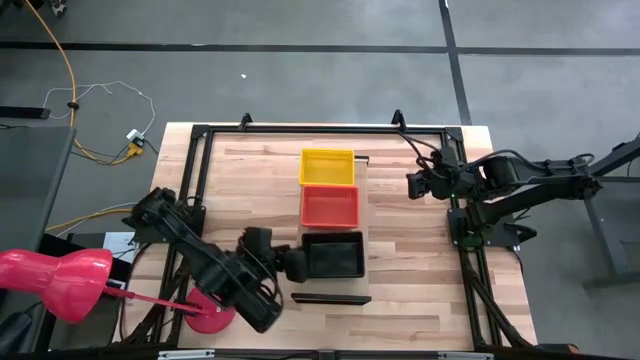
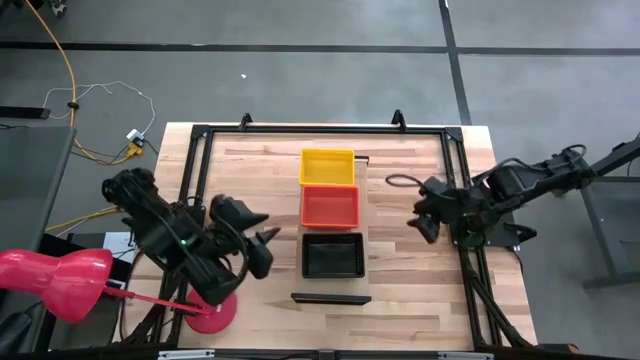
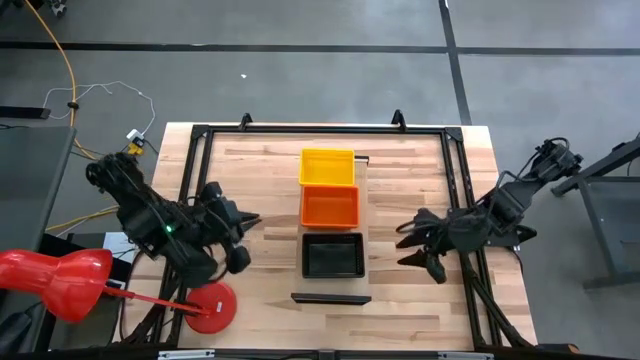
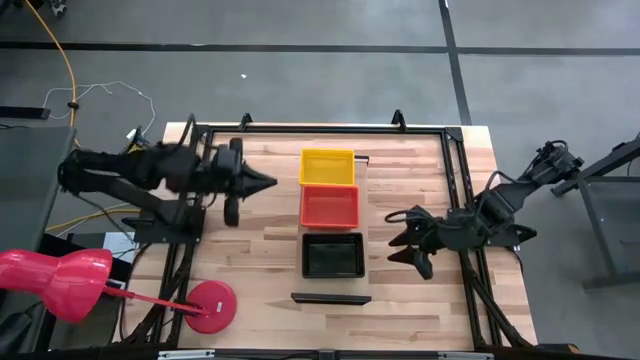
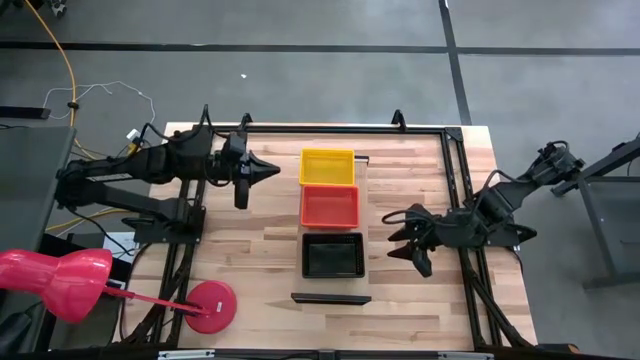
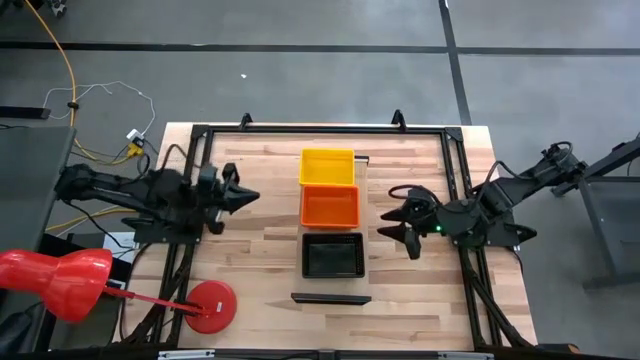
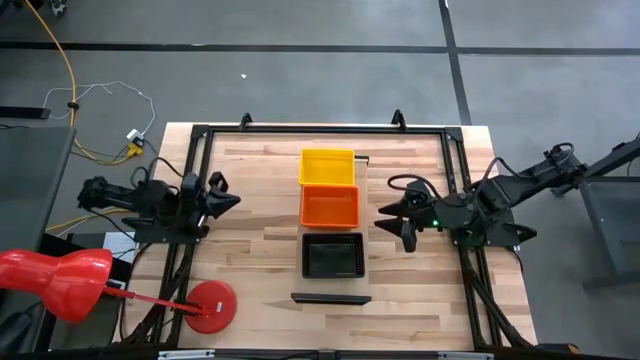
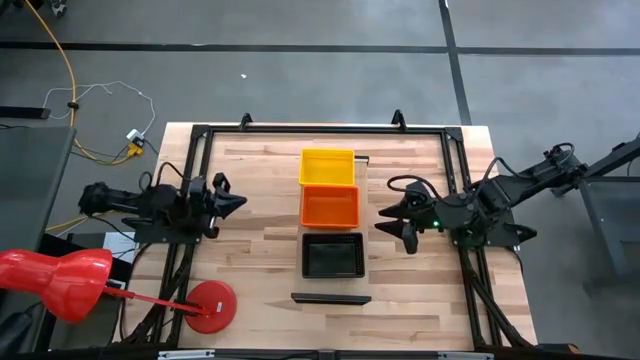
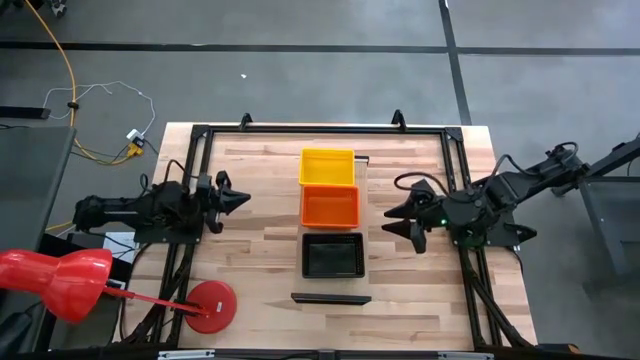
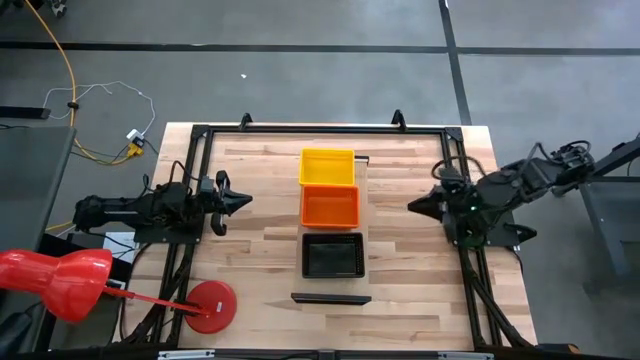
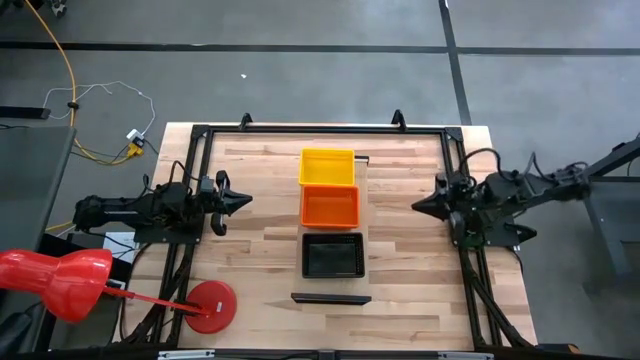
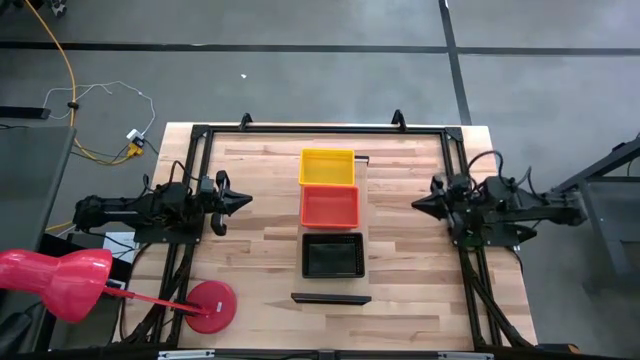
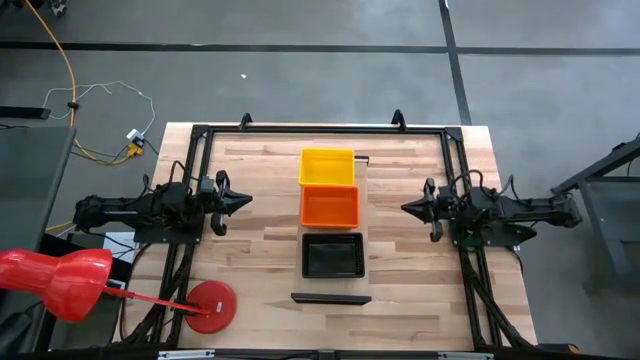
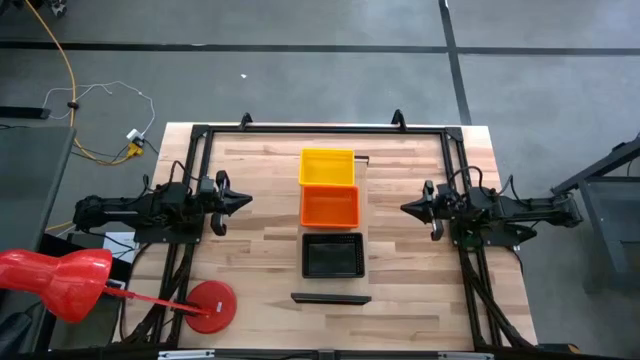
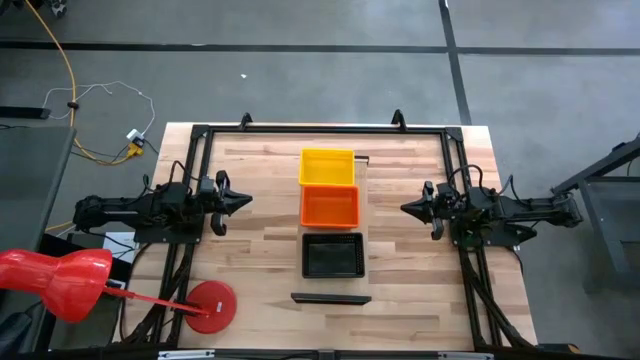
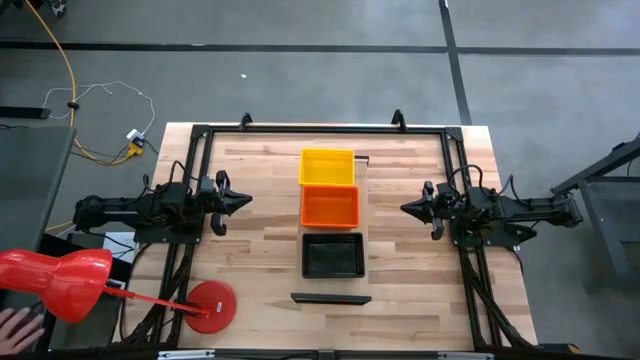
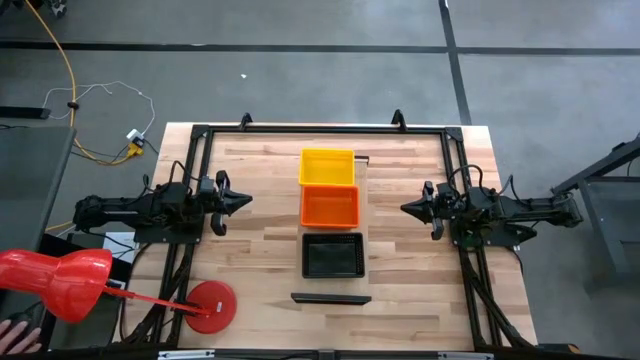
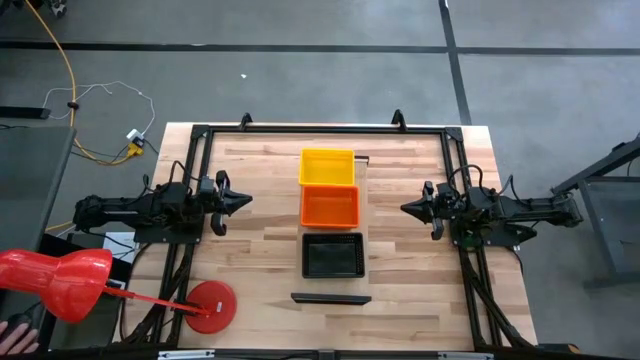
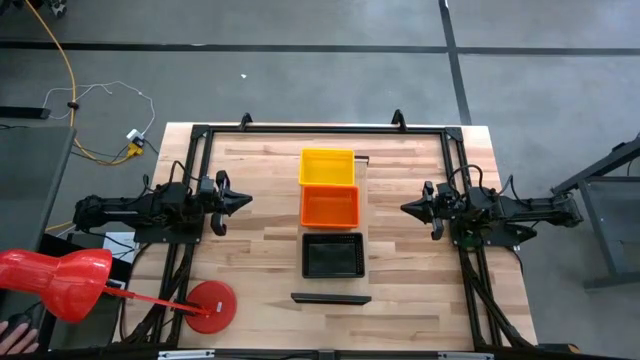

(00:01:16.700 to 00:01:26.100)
Task: Stack baskets on shelf by color
Return to Home Position

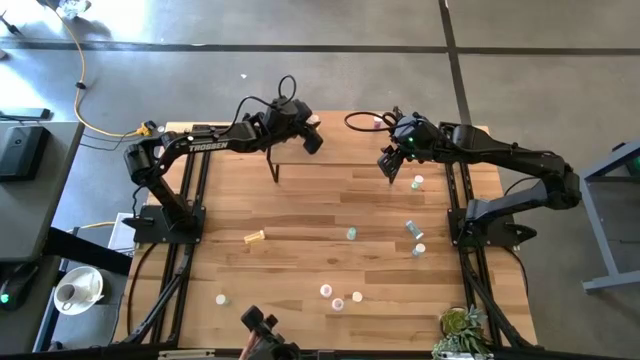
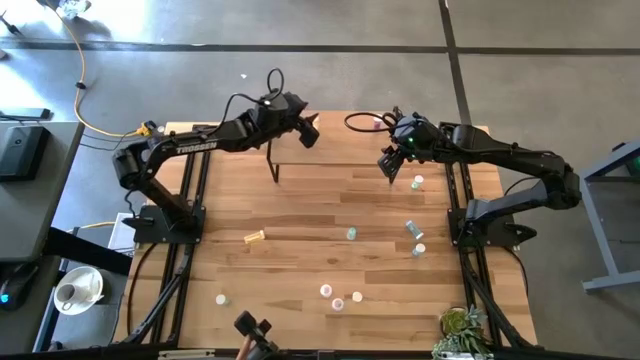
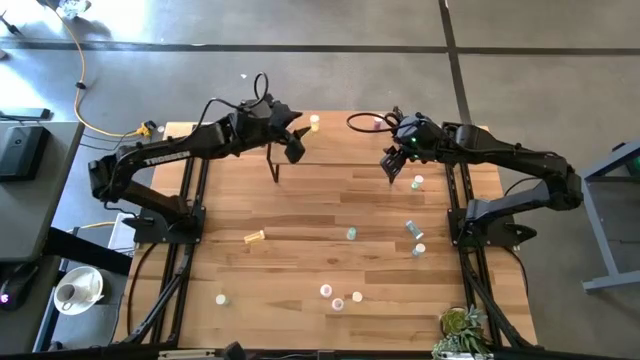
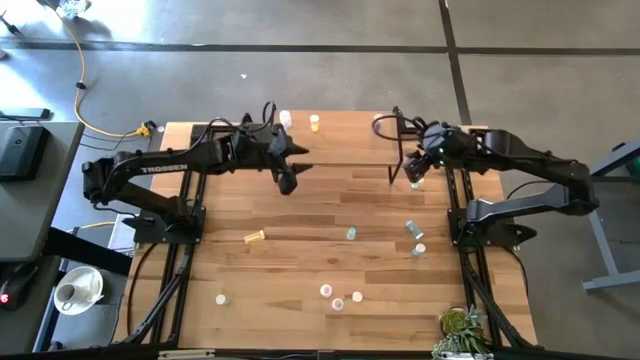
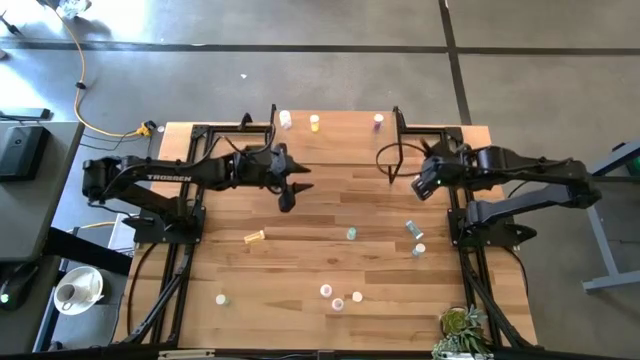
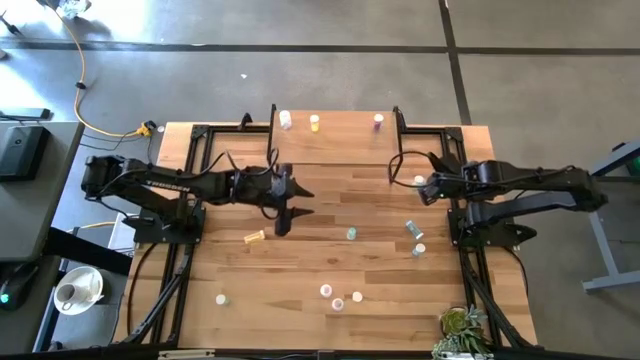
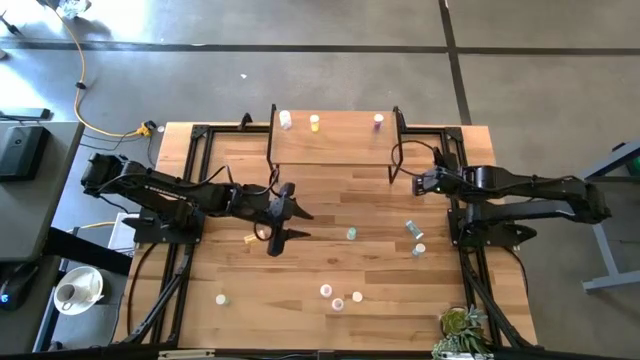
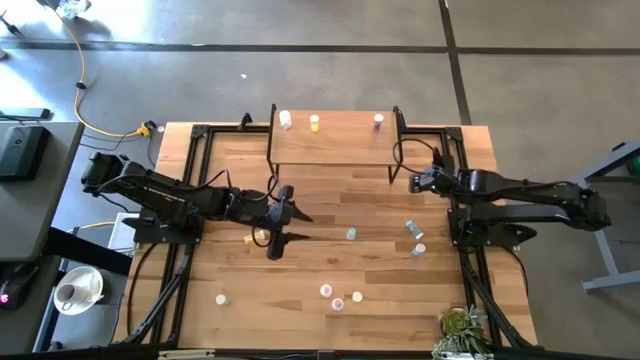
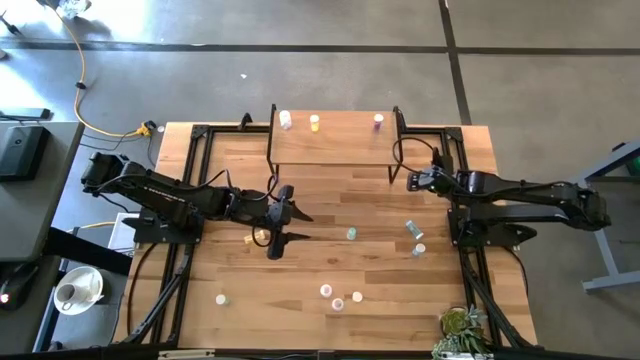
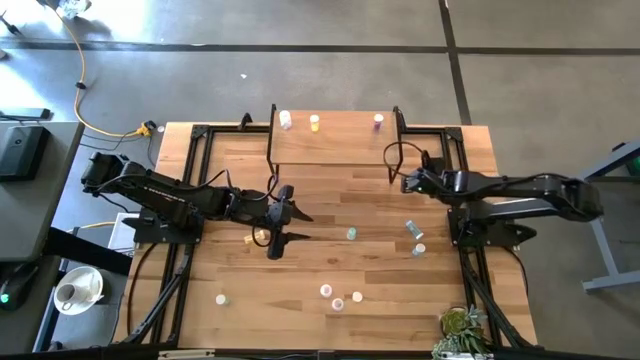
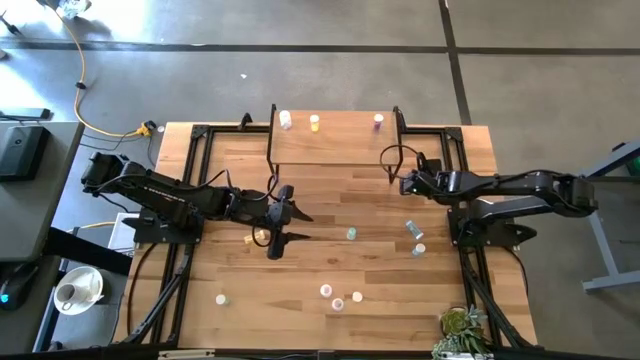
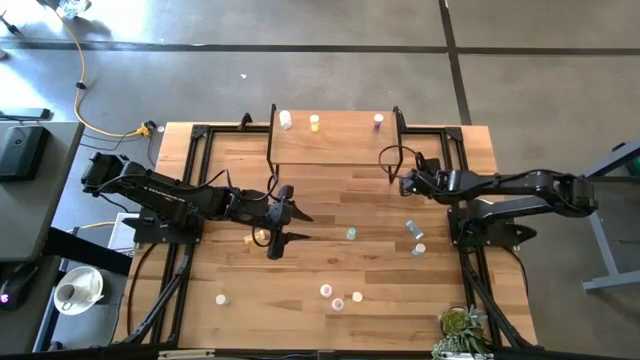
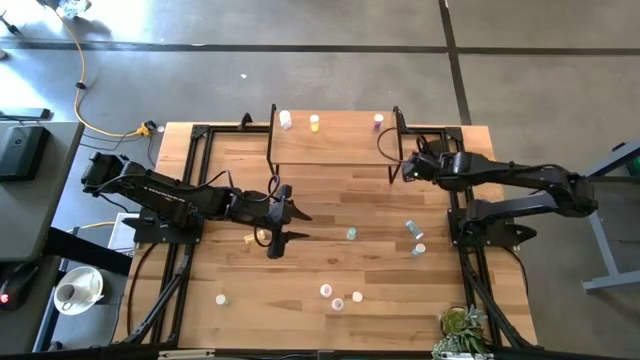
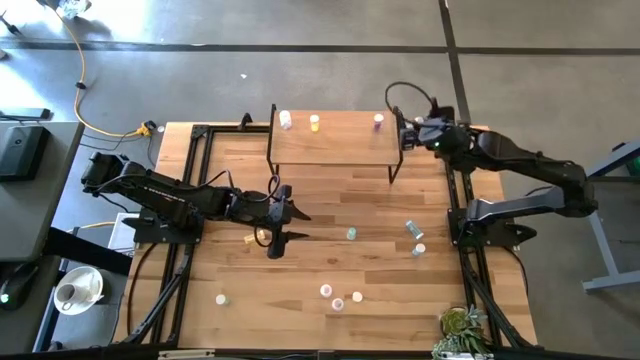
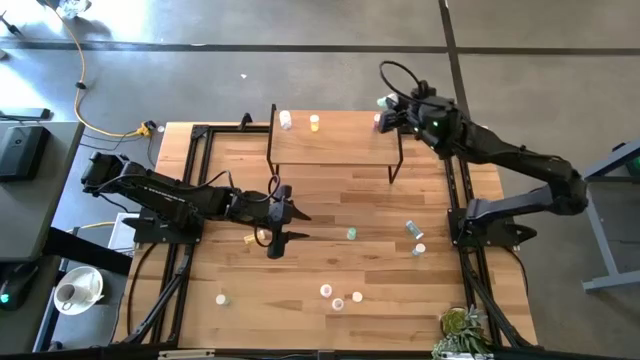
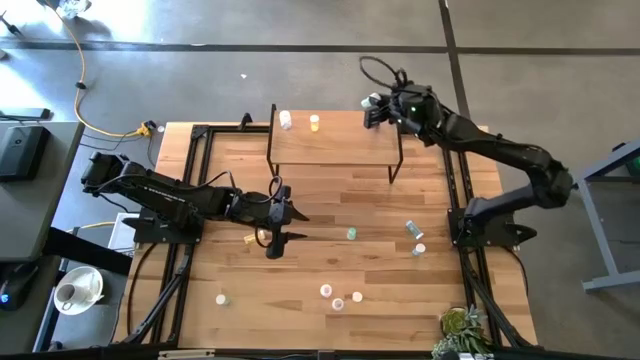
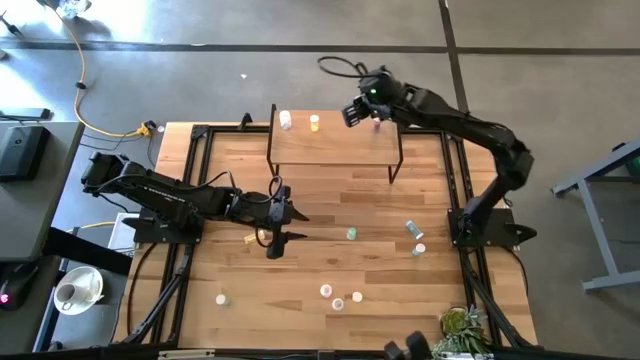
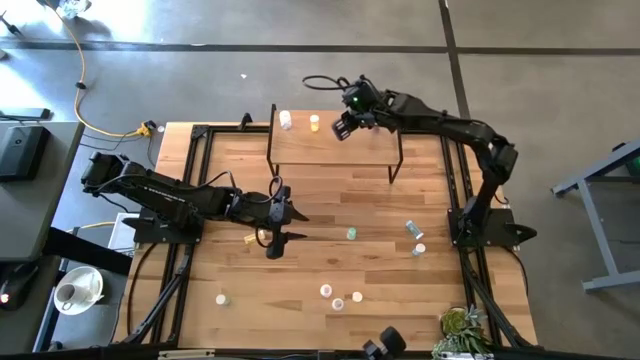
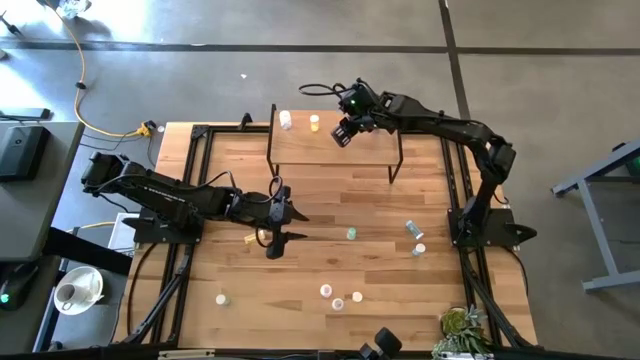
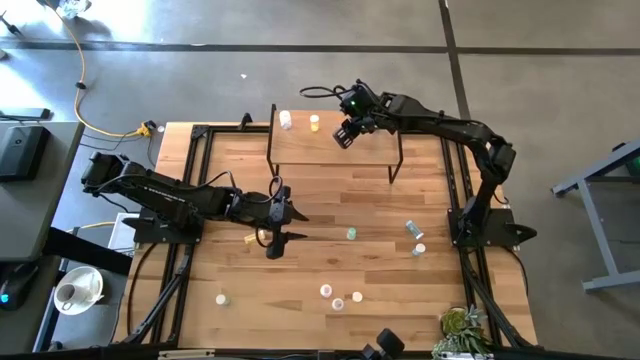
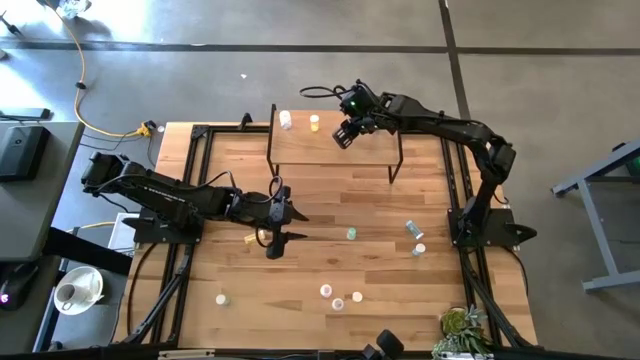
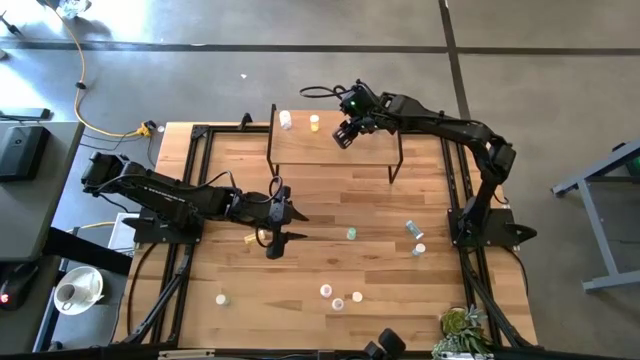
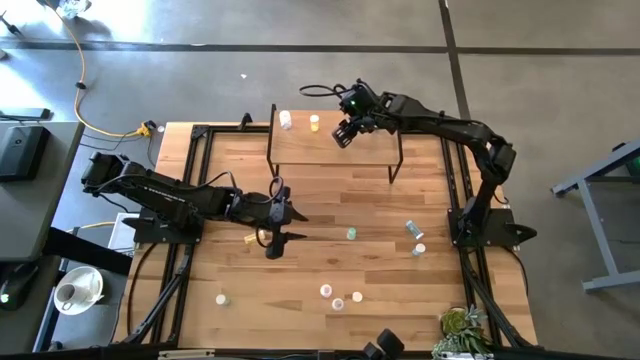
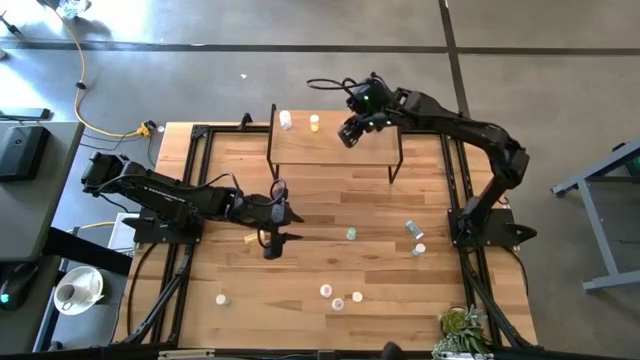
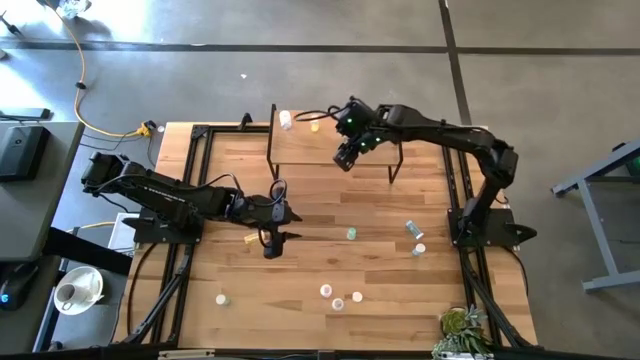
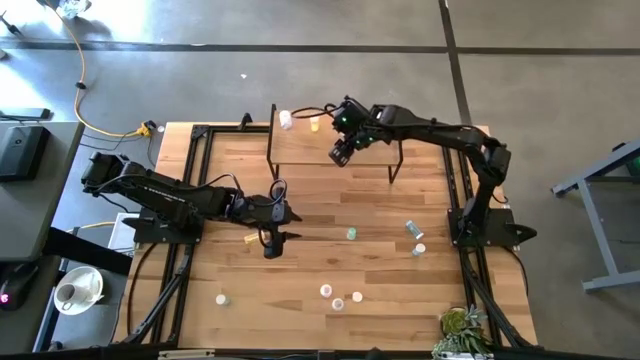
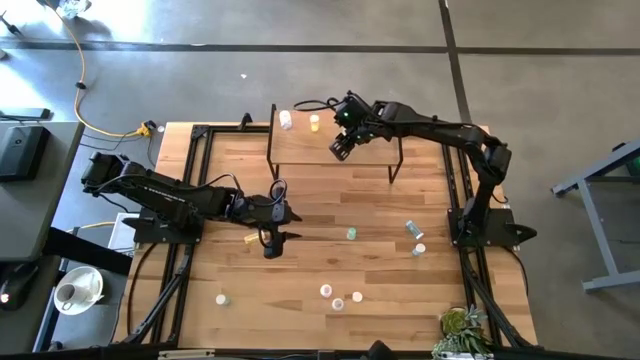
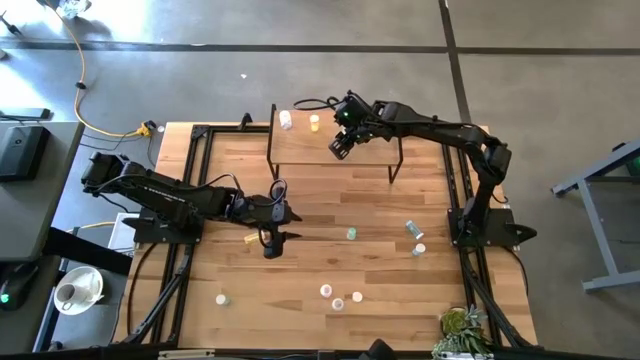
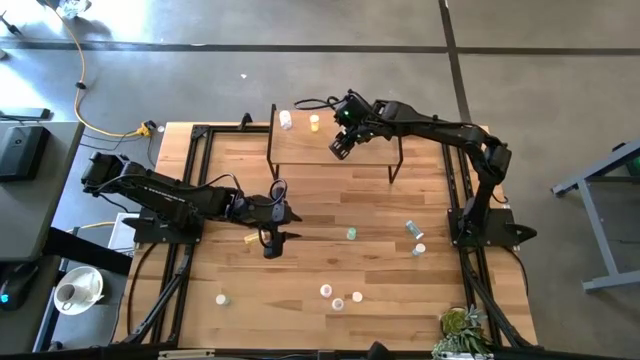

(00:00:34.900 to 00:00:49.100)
Task: Pick and place medicine bottles onto shelf by color
Put the top green pill bottle on the shelf
